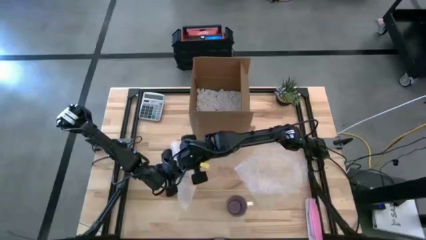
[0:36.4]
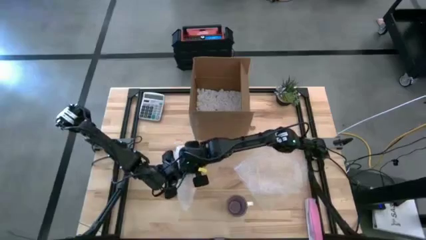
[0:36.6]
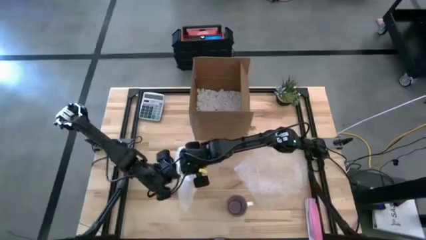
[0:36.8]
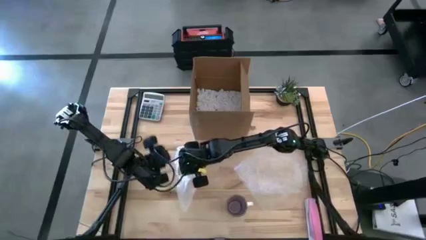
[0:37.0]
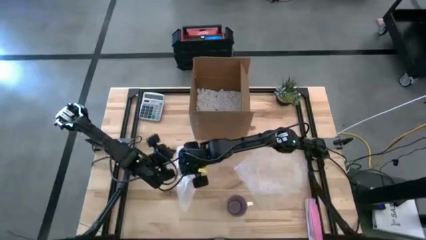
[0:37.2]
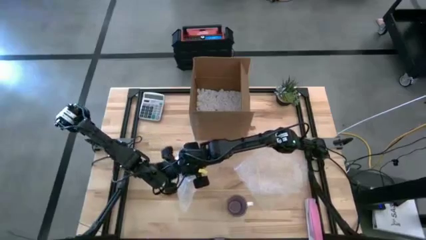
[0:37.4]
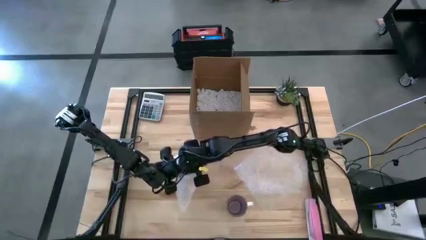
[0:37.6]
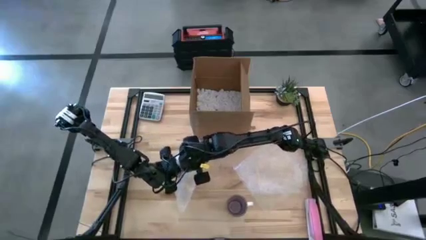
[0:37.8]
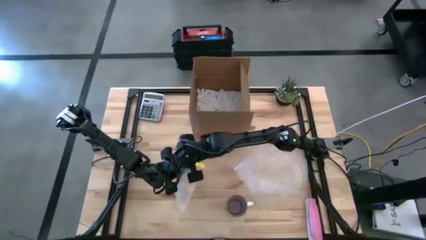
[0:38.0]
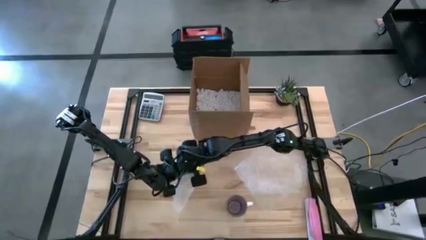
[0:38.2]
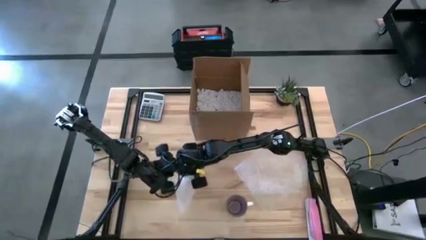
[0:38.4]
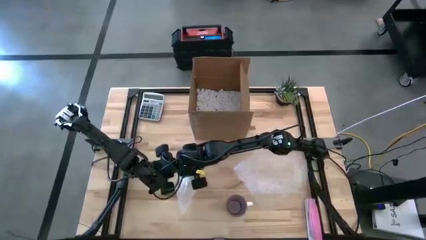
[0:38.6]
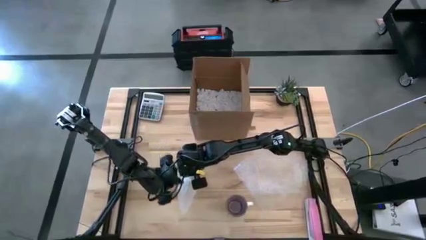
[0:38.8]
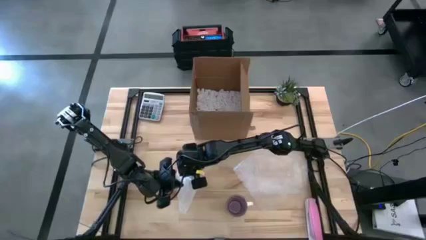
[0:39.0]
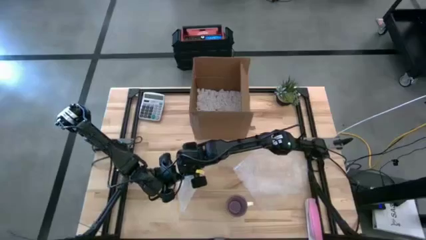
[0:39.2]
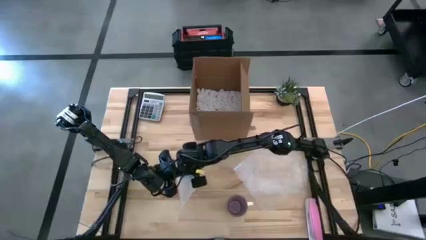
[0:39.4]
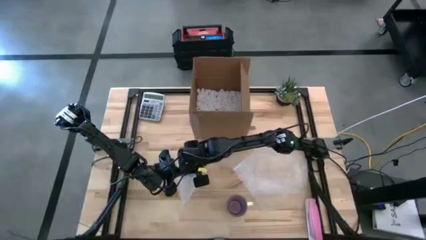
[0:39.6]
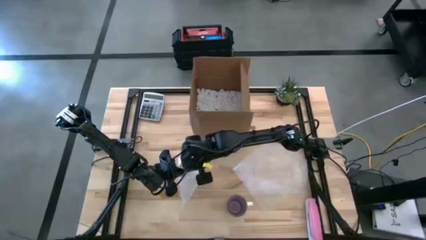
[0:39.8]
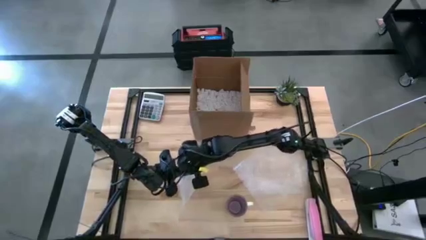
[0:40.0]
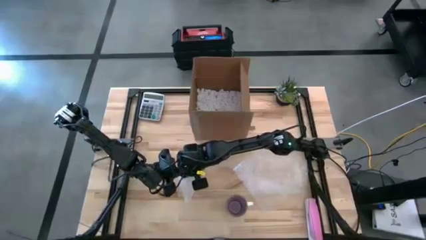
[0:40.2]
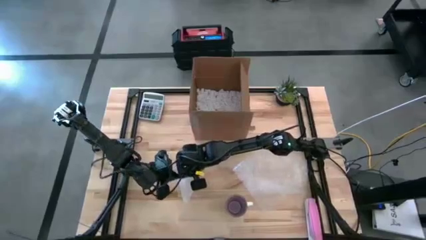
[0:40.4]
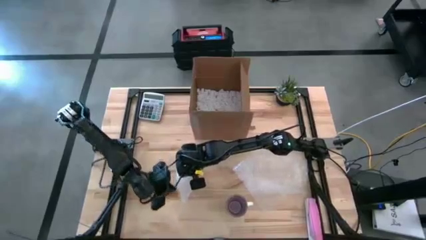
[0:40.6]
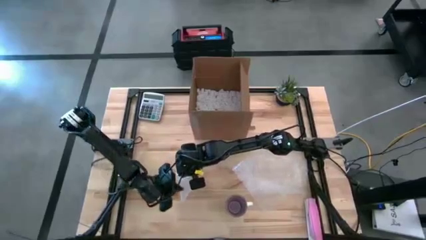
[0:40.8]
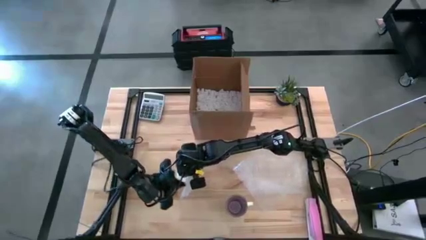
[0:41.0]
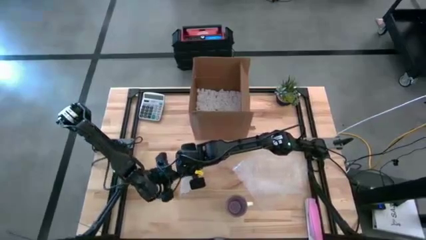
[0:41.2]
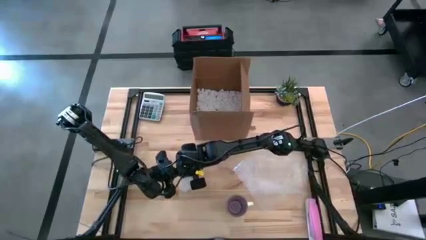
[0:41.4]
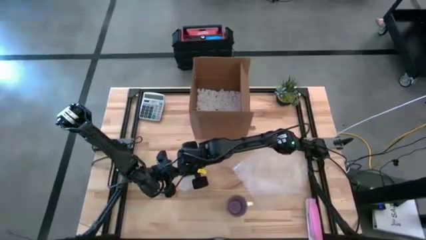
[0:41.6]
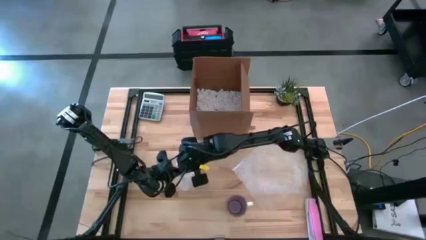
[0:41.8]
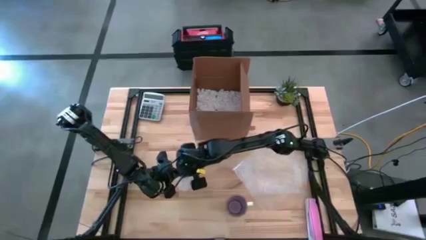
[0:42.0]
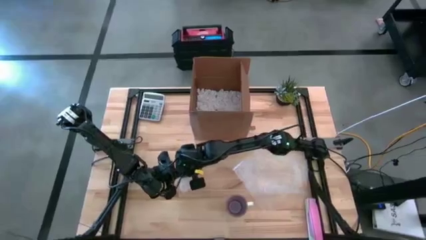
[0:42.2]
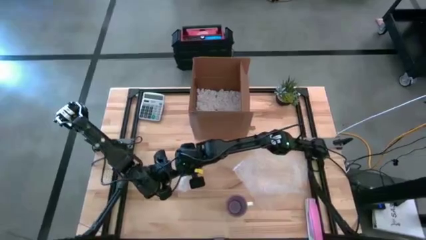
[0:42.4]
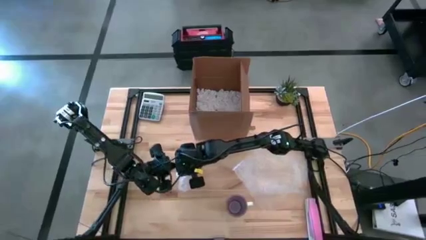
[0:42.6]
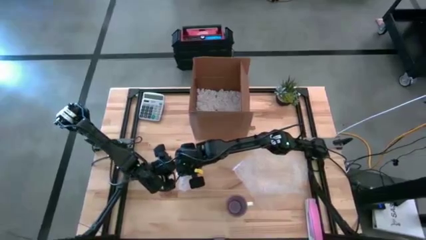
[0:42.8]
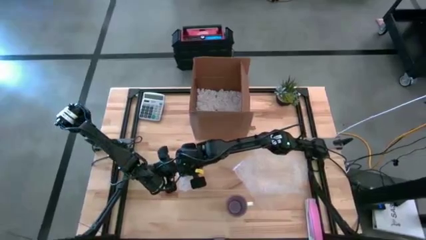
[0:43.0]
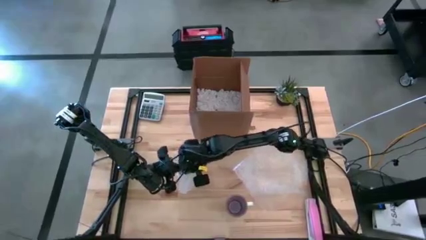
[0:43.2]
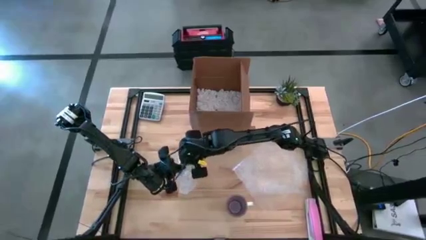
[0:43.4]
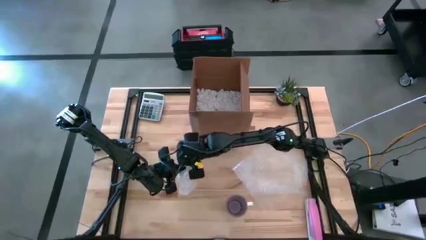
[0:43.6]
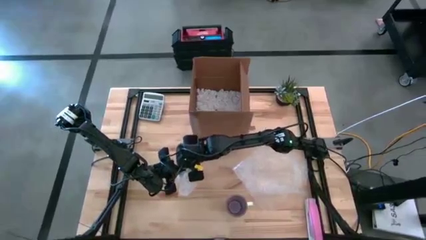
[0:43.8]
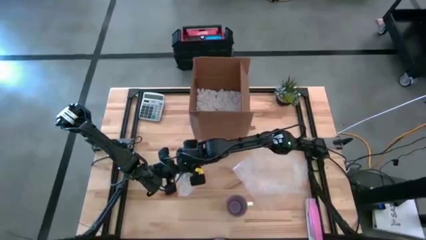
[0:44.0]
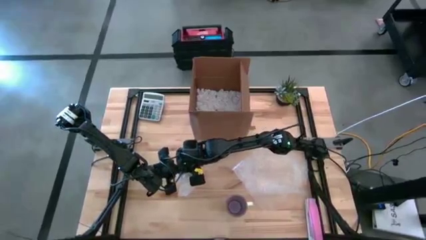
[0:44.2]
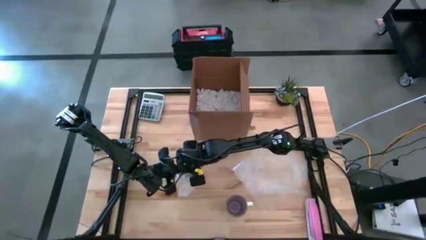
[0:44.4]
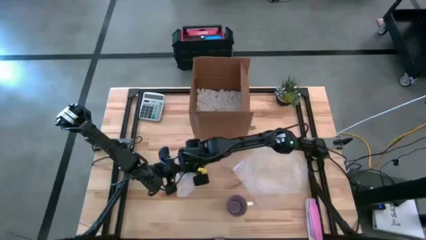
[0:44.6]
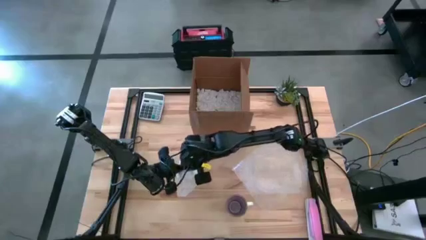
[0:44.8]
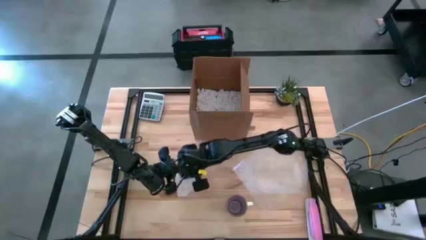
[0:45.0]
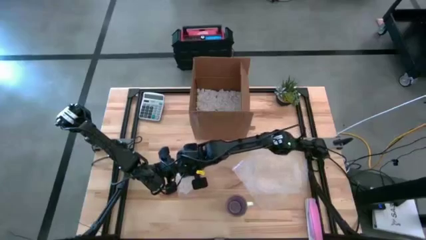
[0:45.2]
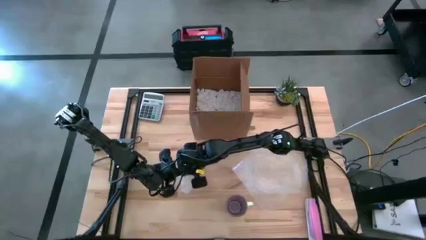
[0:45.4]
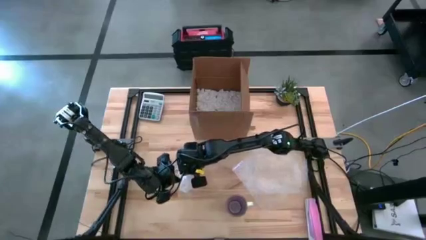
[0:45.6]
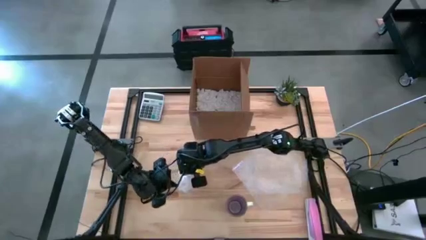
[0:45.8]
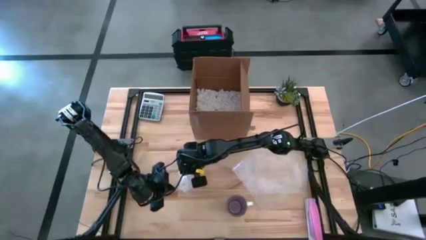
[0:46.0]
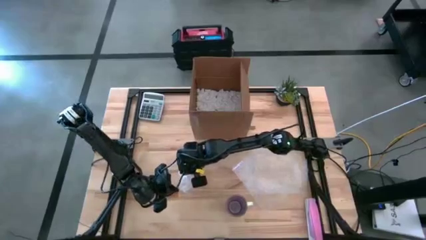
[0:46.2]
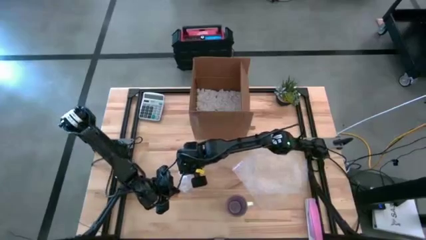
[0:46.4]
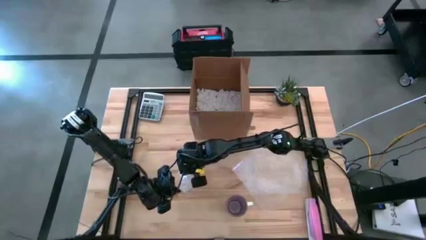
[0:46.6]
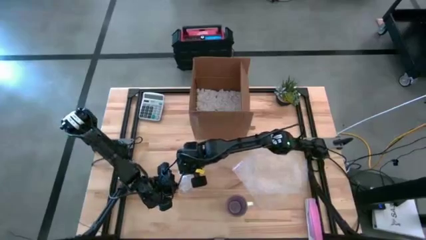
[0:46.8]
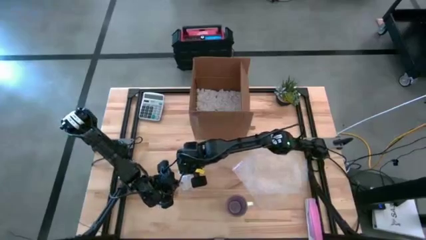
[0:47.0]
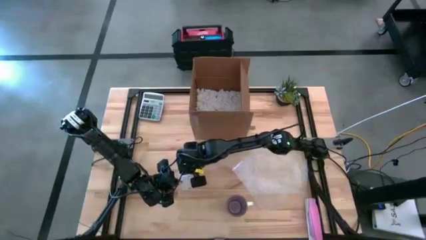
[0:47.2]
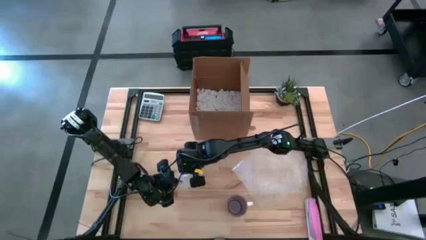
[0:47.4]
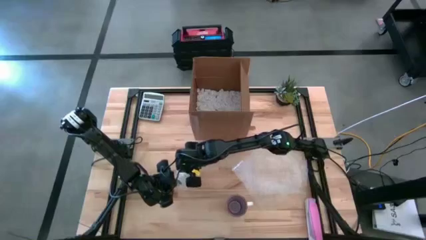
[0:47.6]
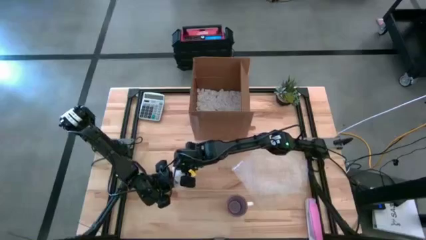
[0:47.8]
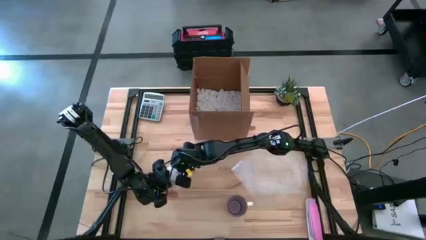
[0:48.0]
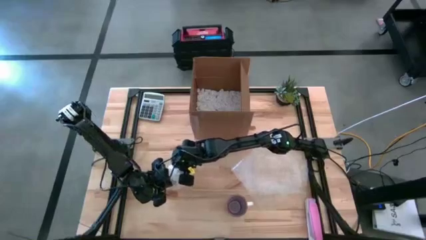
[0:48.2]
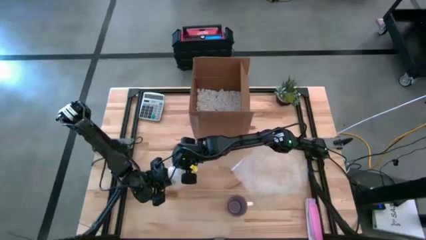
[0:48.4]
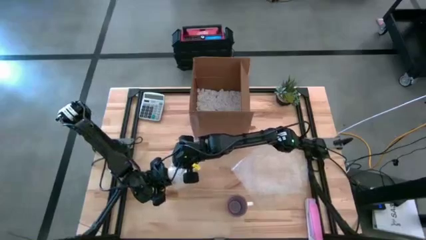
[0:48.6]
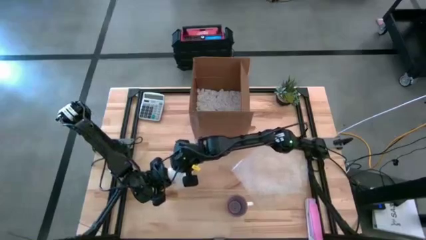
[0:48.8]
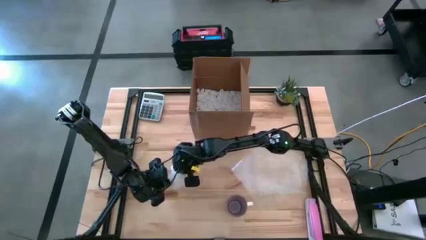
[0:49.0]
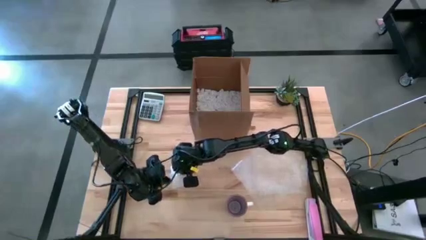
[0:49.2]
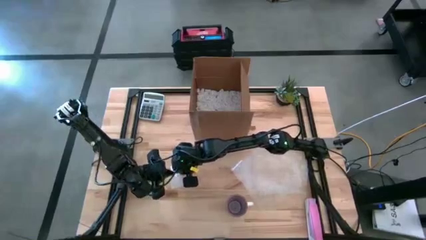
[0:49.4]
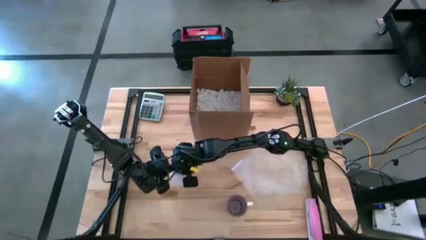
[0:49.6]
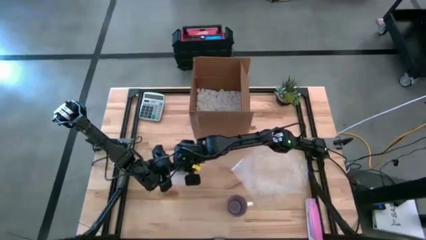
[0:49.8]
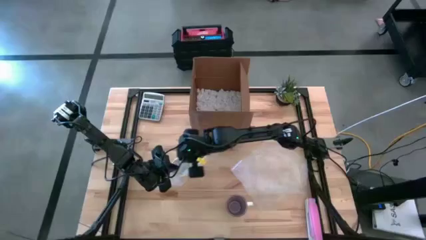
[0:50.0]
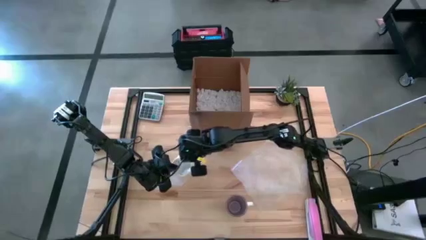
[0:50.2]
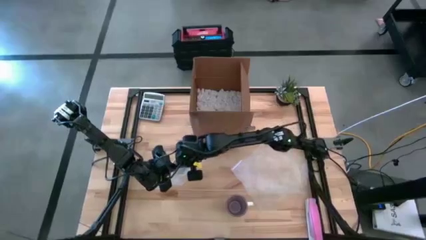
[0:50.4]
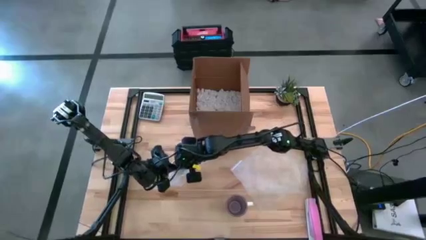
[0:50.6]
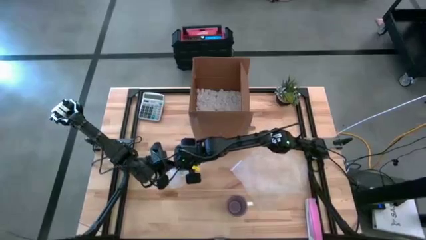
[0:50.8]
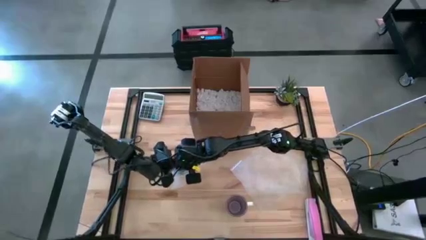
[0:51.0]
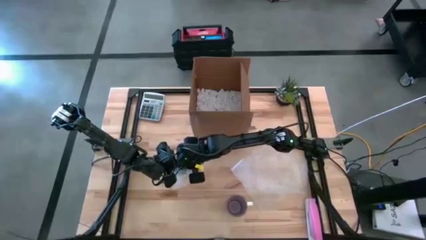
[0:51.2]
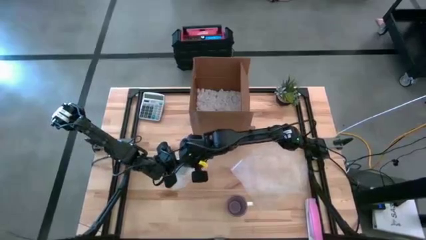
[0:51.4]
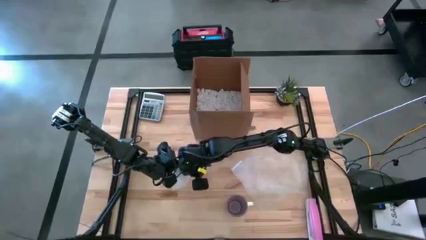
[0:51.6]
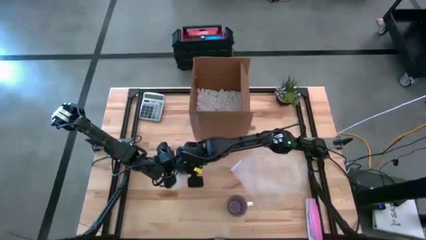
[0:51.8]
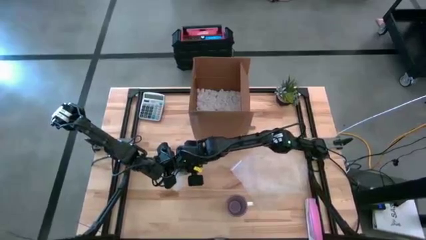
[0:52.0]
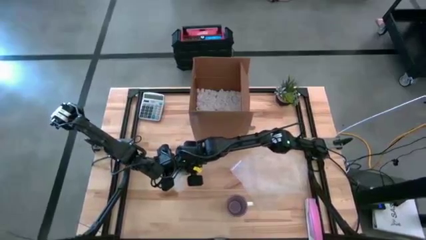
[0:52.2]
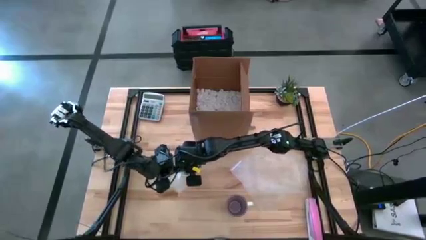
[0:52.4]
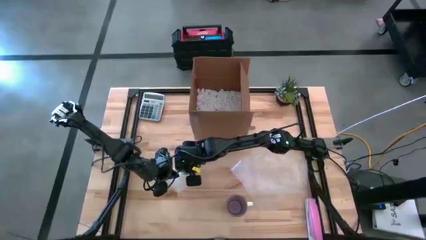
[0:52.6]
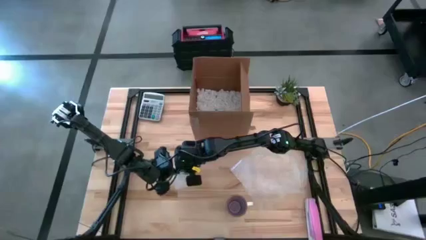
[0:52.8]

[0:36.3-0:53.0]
Task: wrap mug
Wrap the yellow mug with bubble wrap
